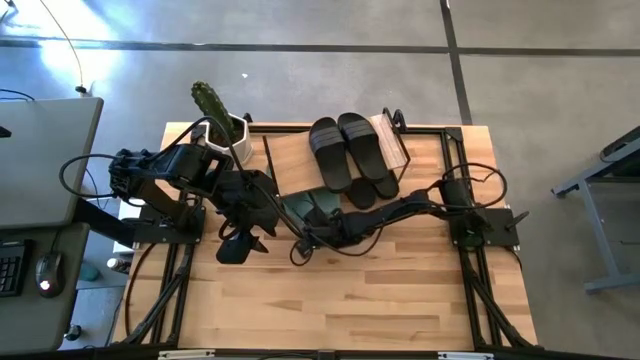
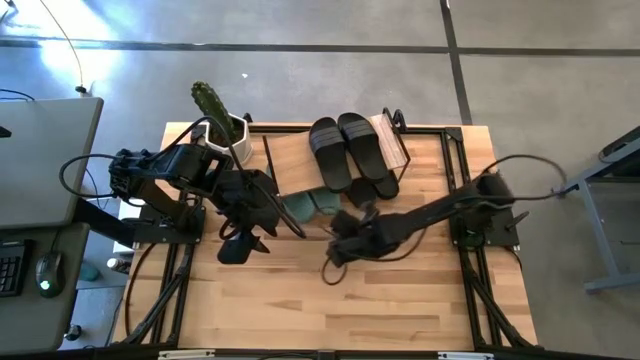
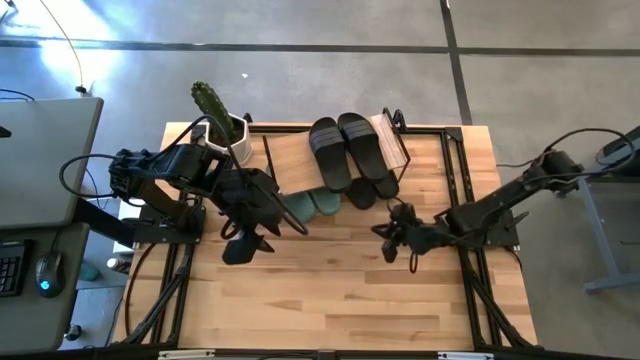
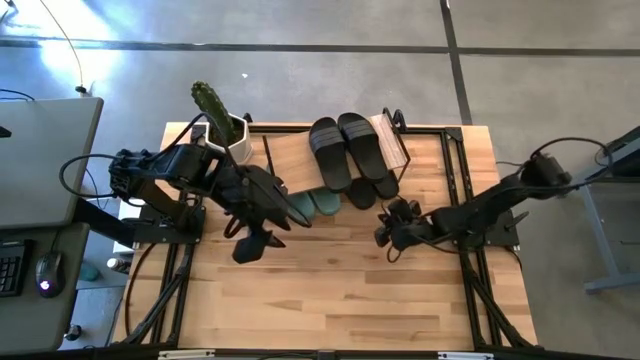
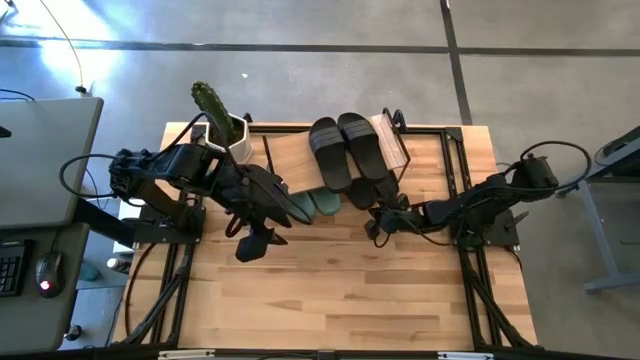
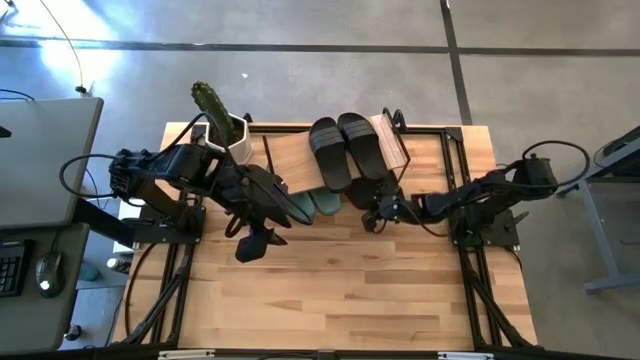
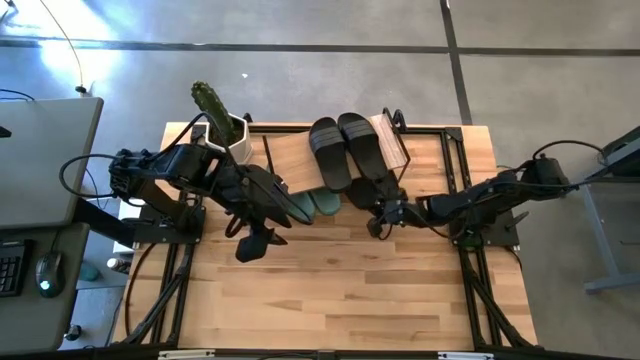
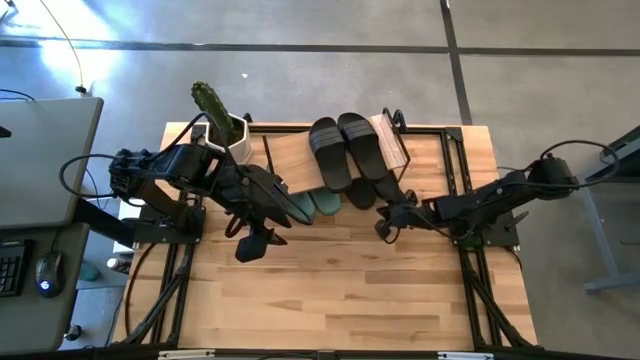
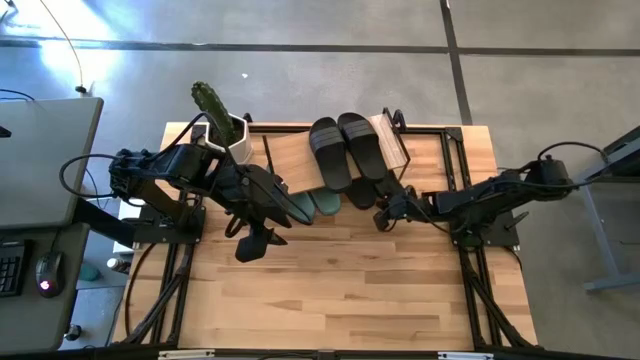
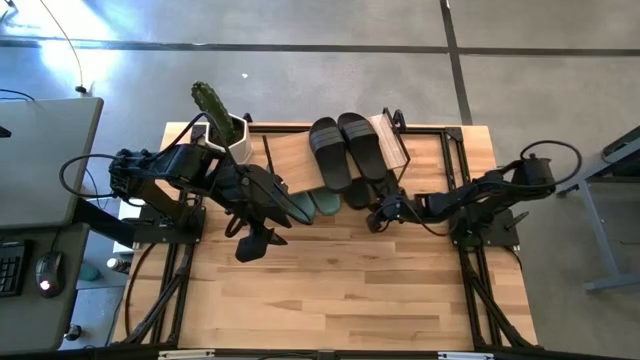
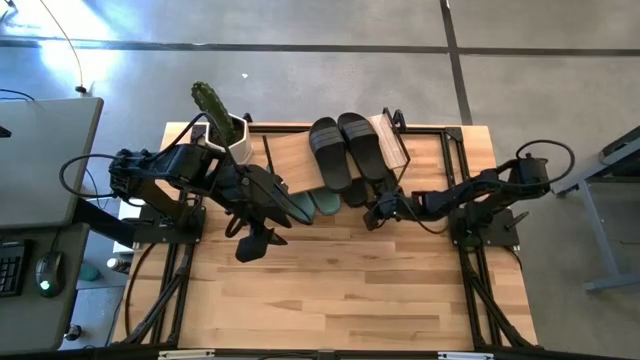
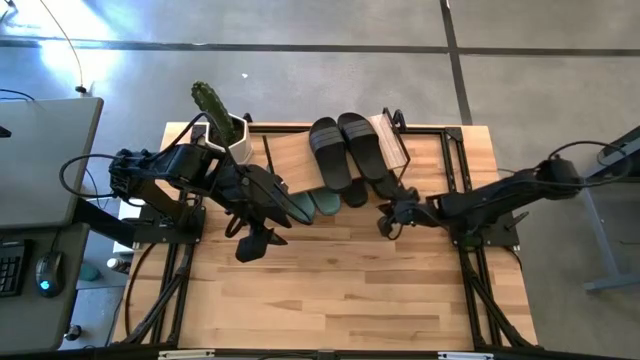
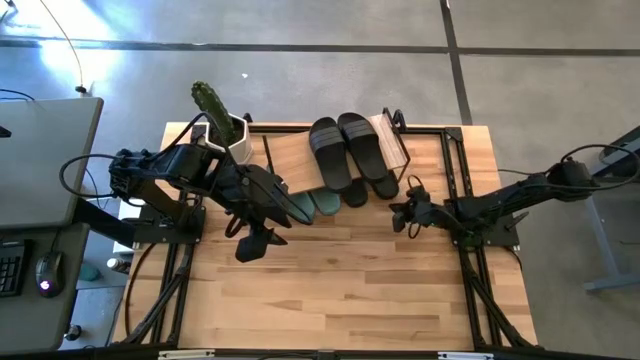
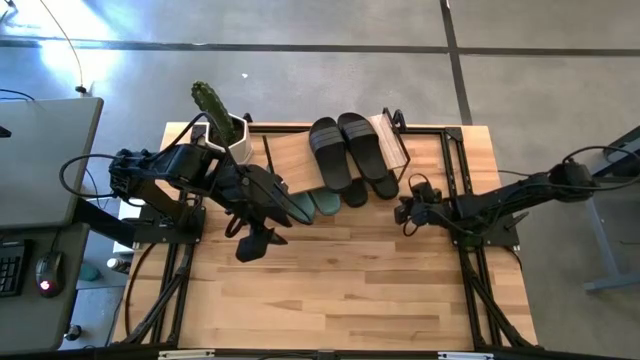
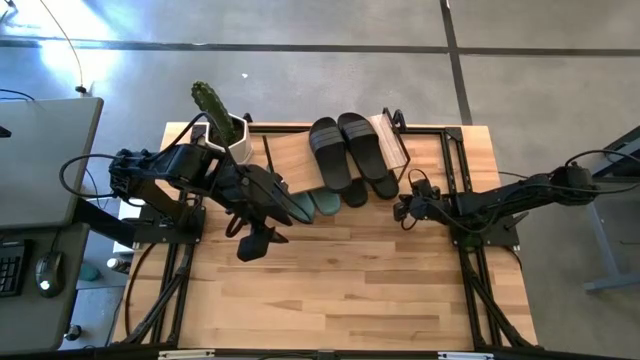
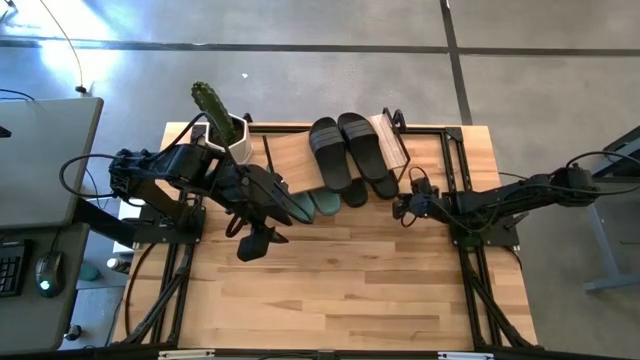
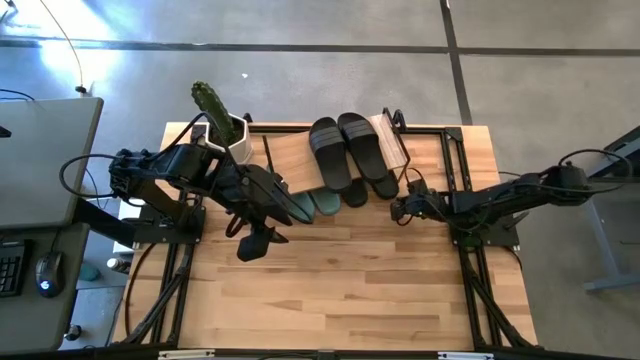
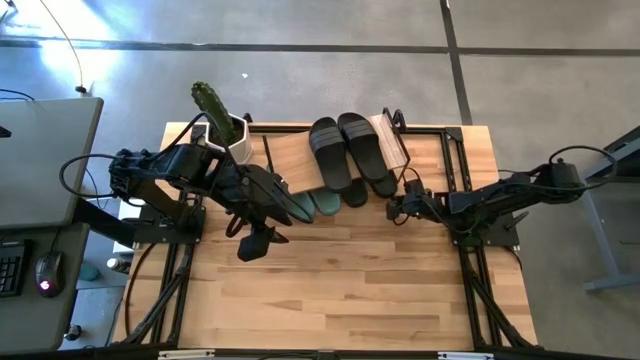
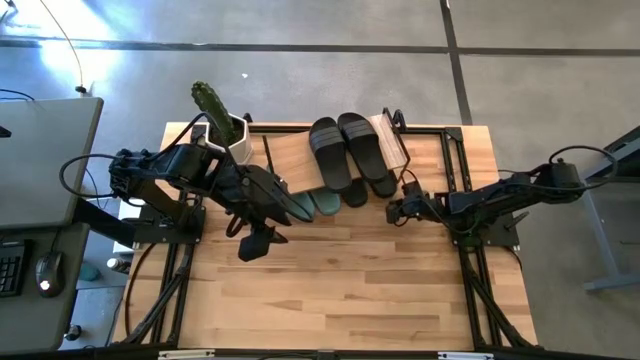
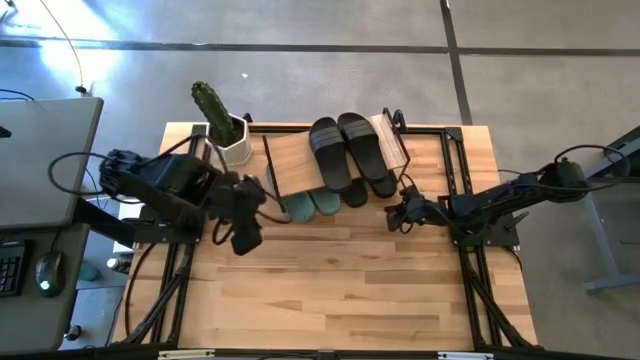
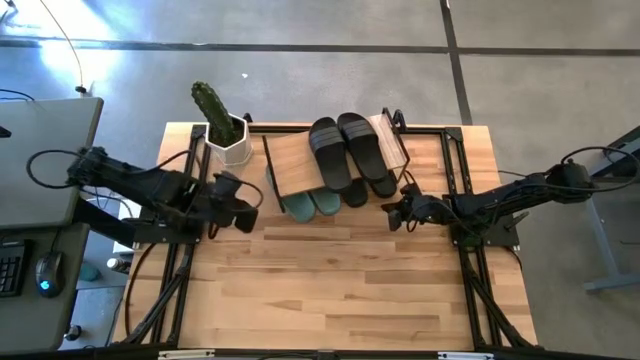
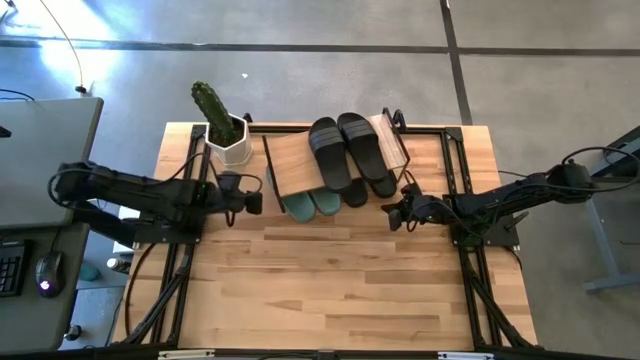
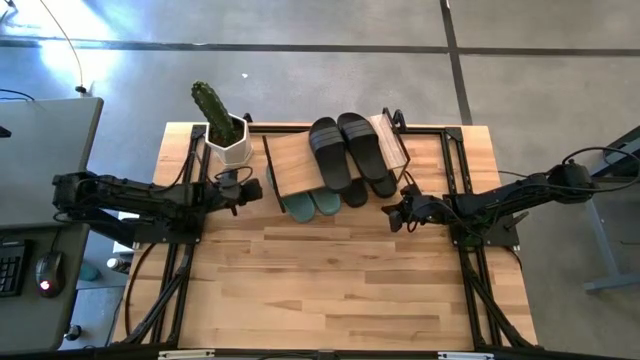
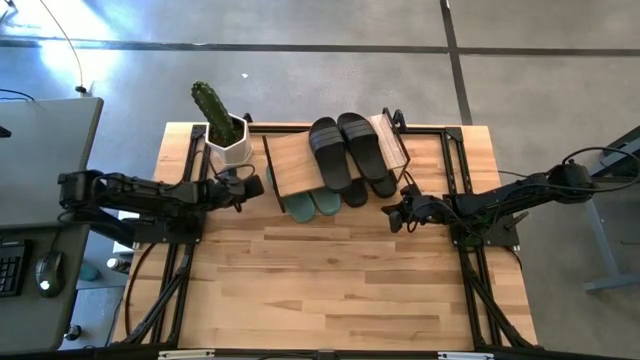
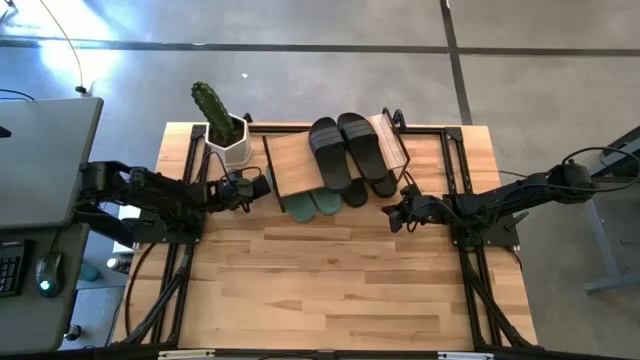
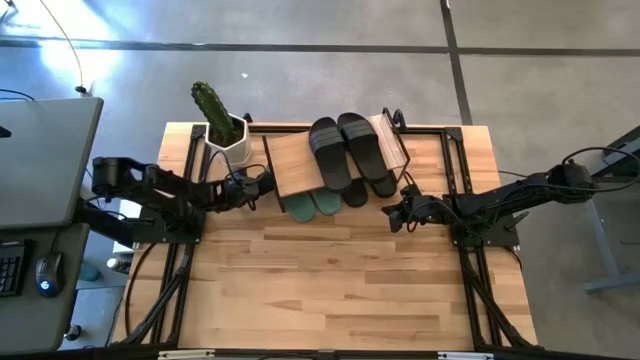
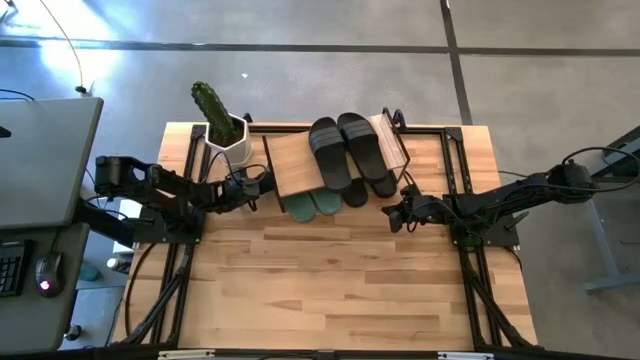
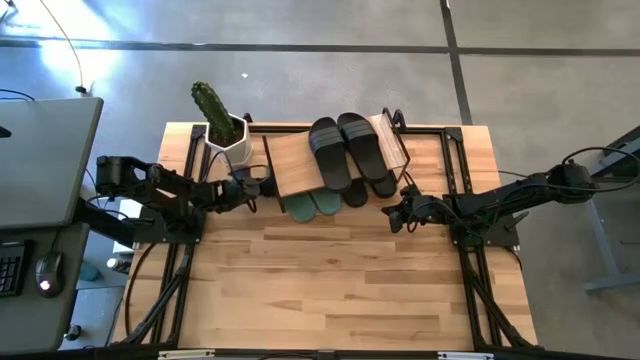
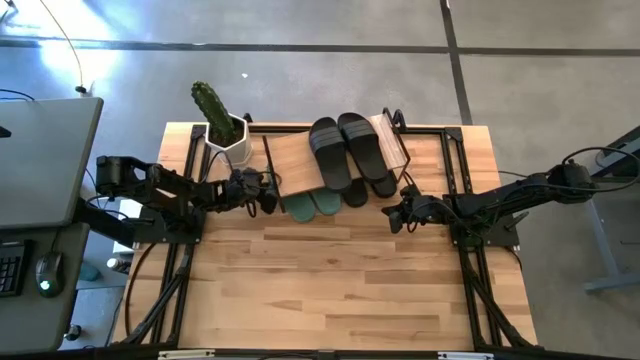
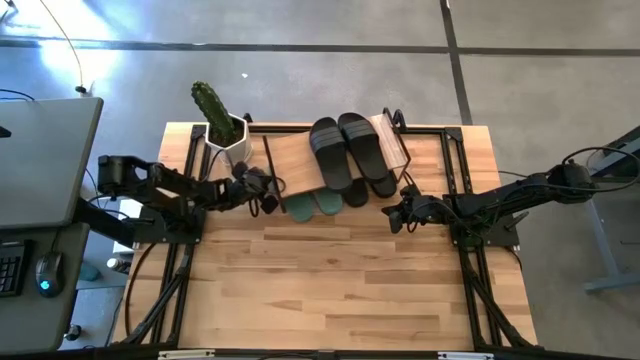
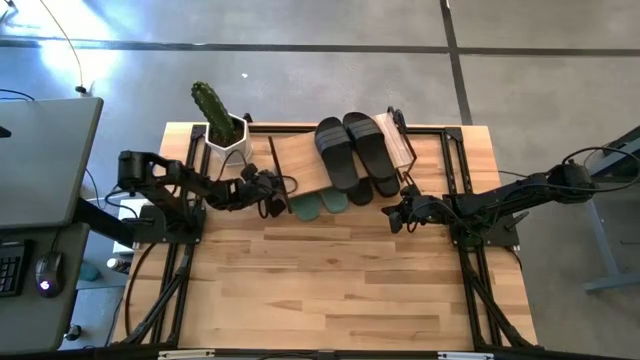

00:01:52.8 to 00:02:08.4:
Task: Pick and place slides into the shelf
Adjust the slippers under the shelf

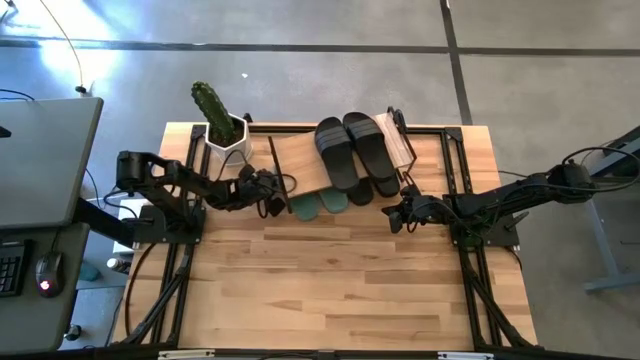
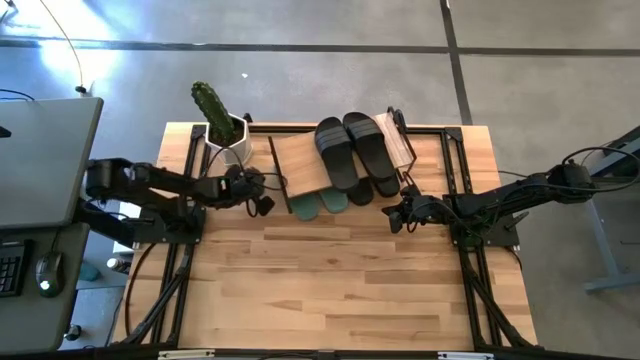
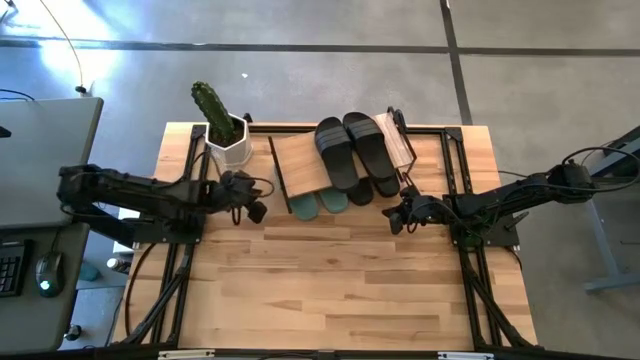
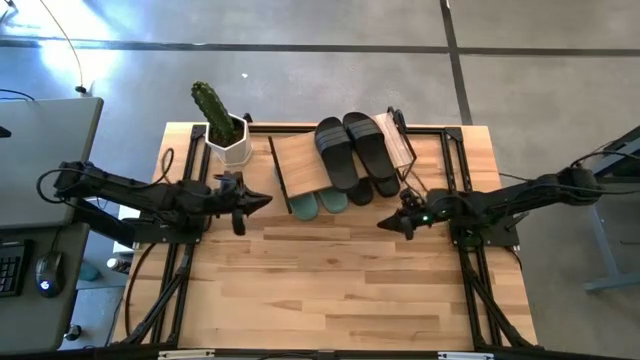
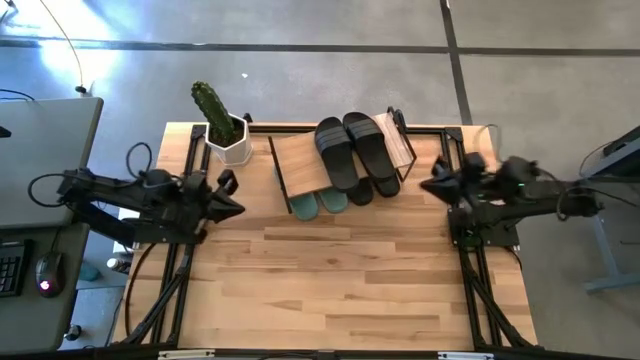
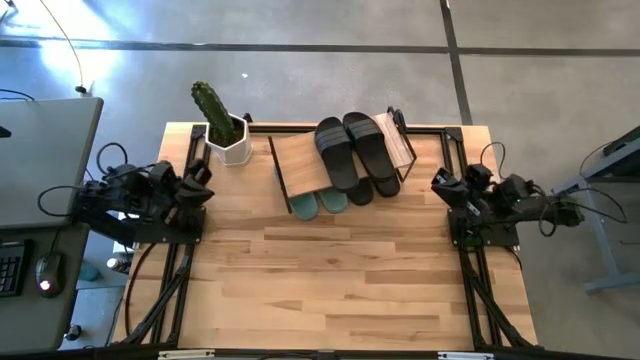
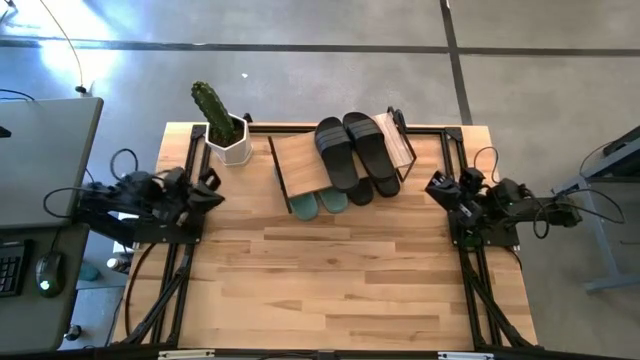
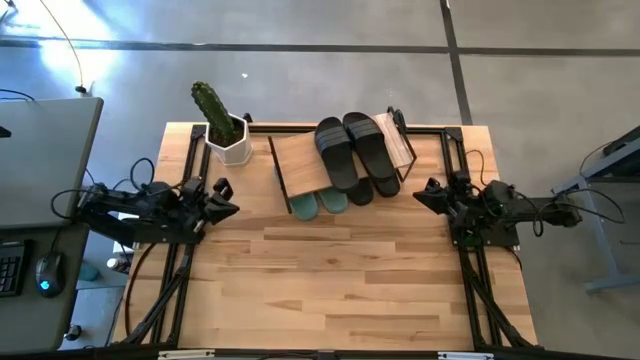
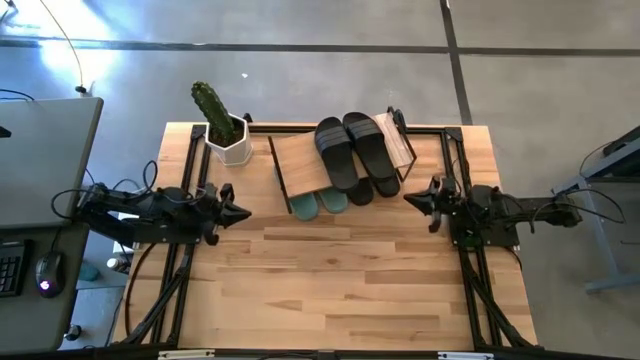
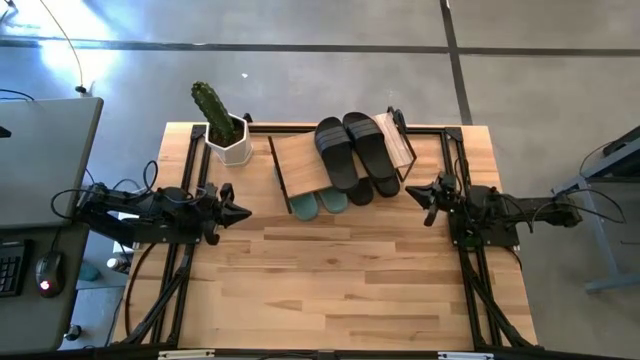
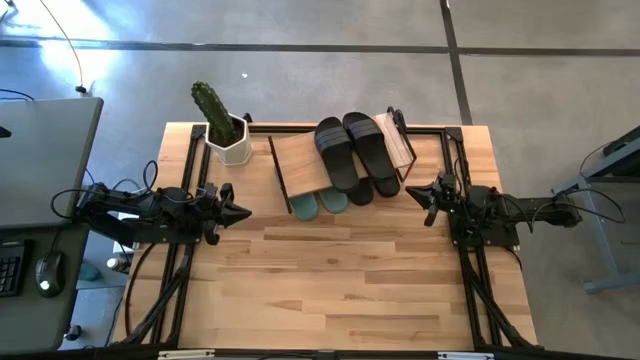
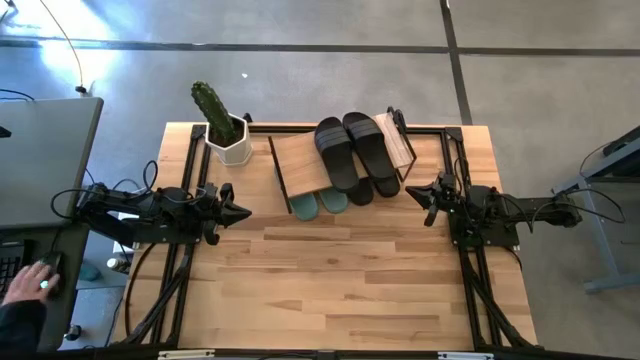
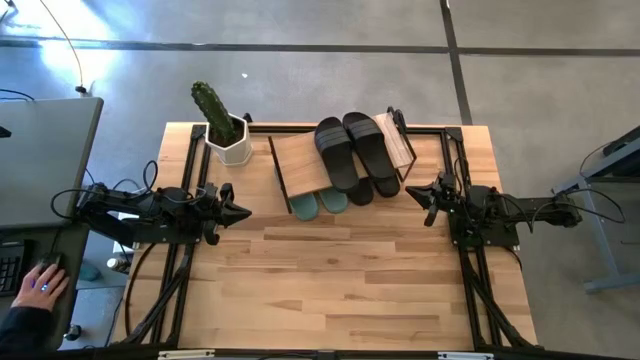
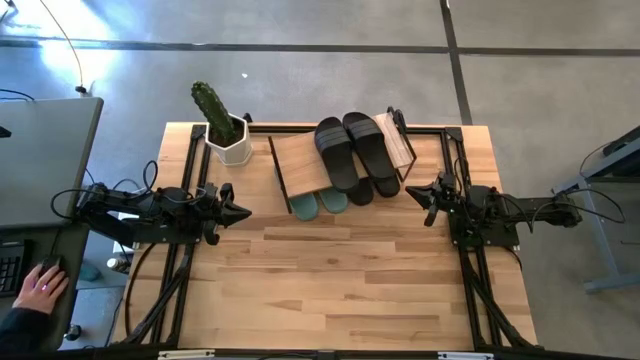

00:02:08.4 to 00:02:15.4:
Return to Home Position
